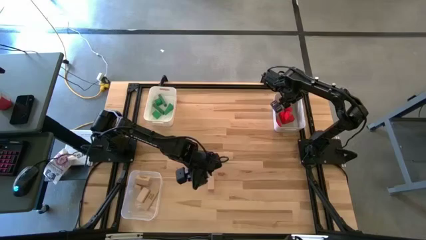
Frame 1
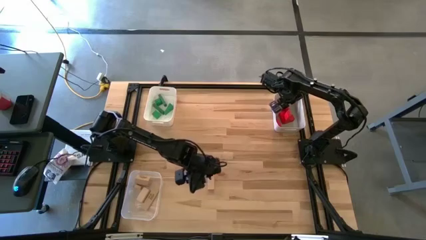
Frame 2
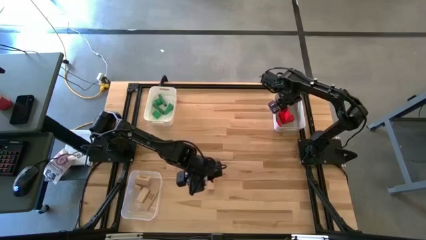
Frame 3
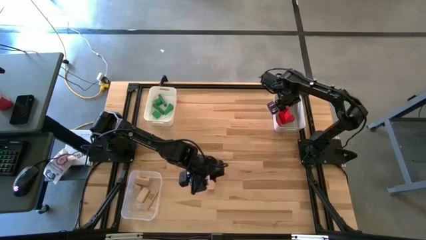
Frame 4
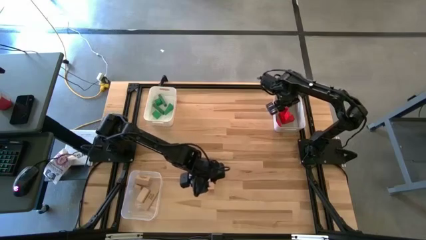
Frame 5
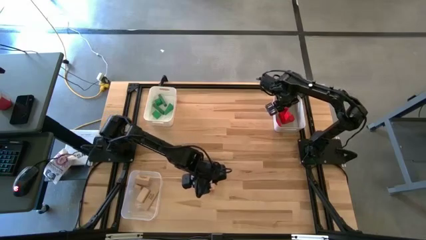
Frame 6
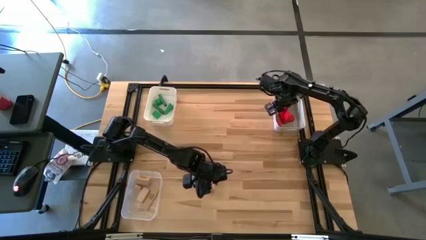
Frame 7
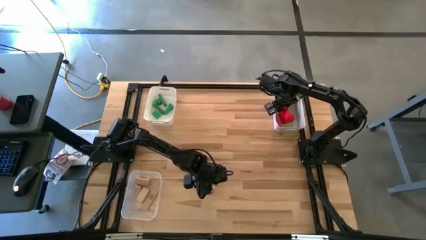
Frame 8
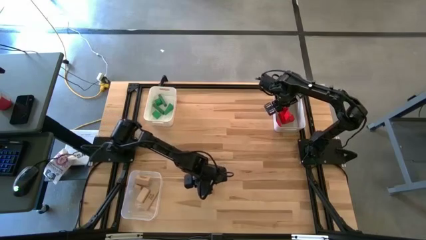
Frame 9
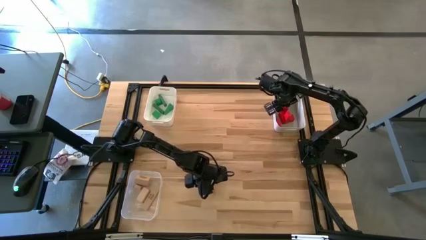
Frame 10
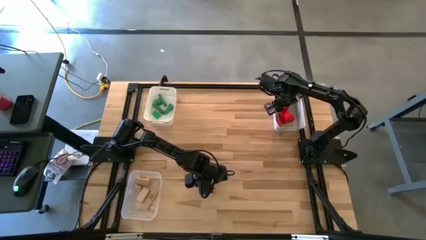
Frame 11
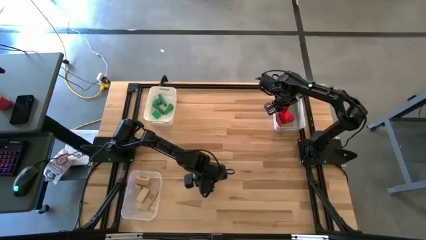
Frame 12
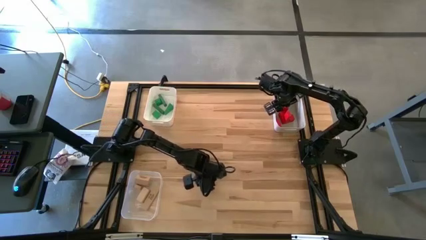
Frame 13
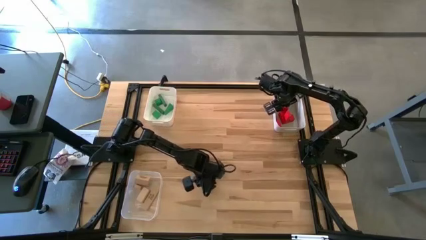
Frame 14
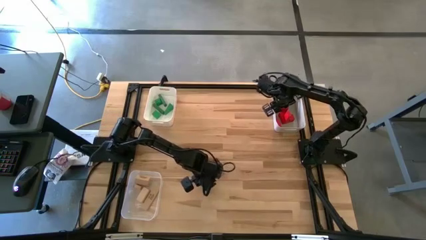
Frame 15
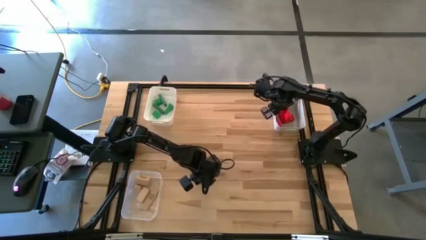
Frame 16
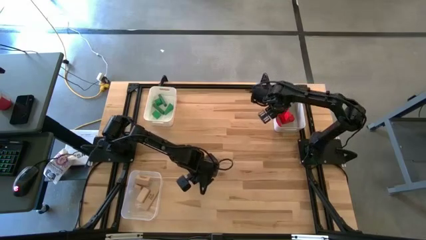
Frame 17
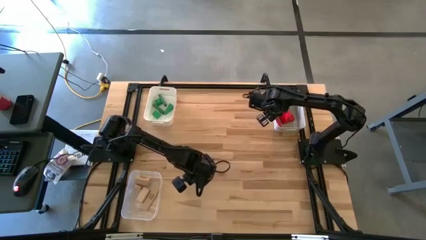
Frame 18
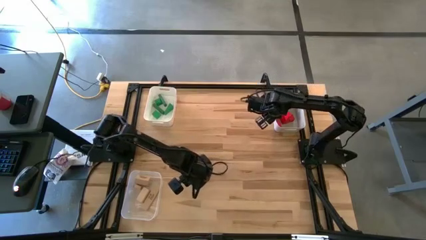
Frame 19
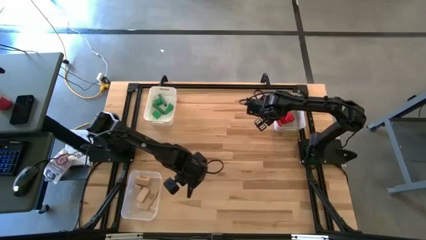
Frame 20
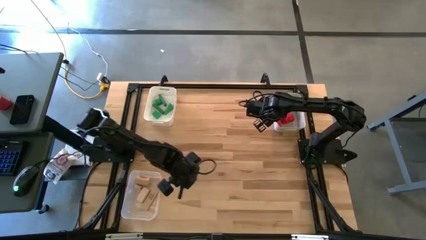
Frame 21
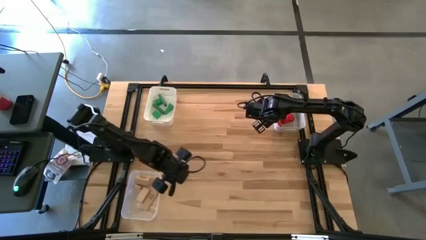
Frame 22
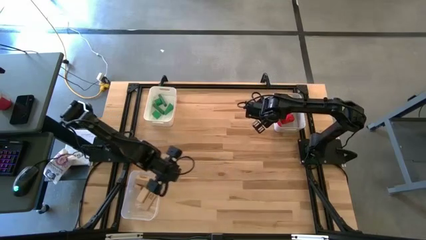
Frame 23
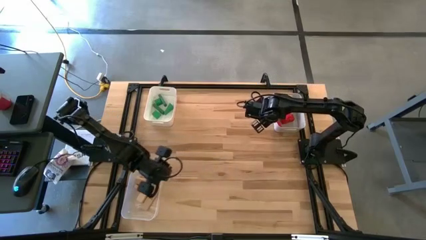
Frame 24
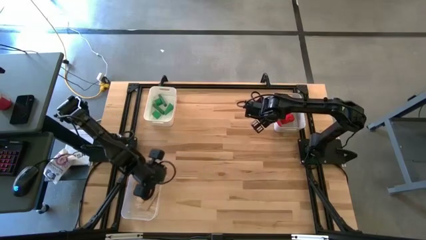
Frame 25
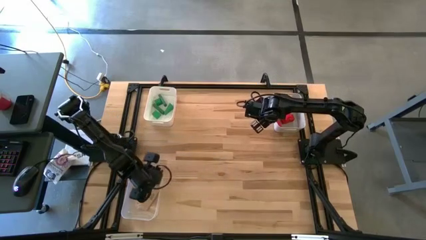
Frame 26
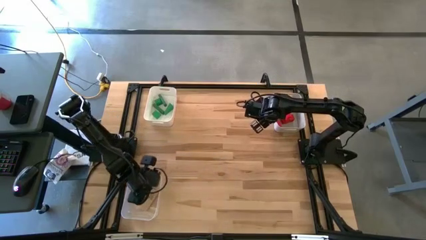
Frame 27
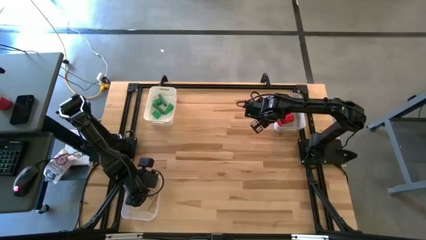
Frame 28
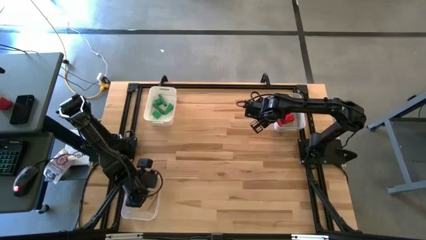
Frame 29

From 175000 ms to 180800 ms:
Task: Sort & place blocks by color
Put the brown block into the transparent bin

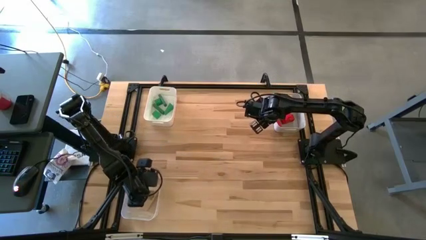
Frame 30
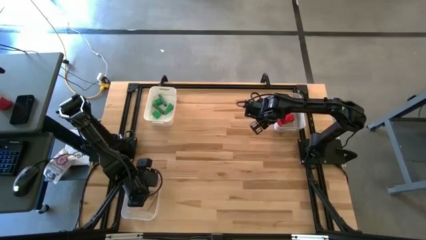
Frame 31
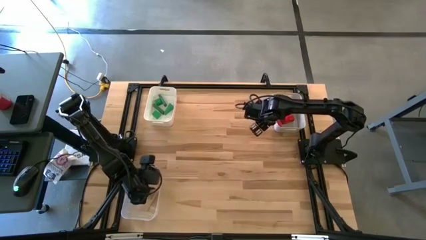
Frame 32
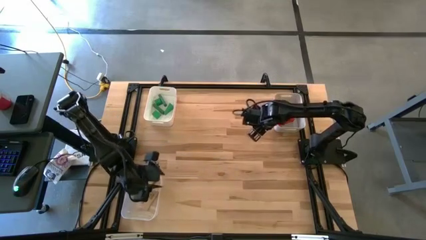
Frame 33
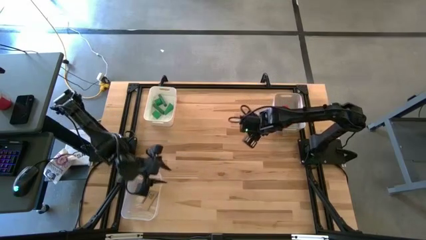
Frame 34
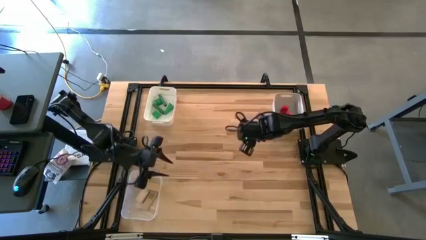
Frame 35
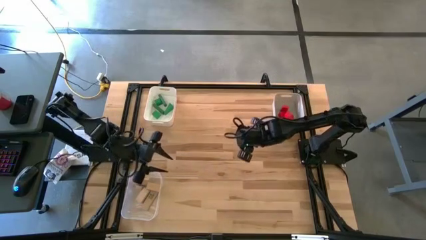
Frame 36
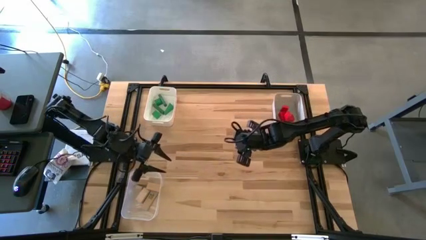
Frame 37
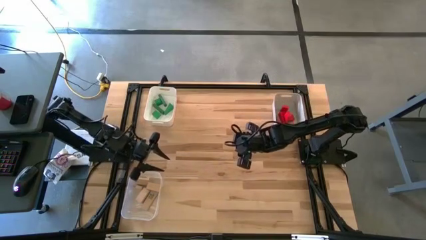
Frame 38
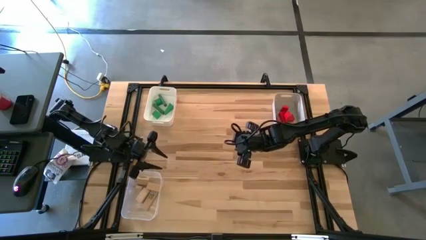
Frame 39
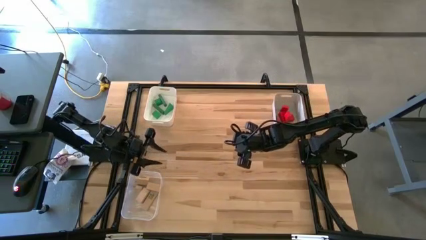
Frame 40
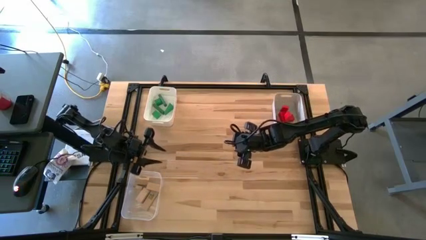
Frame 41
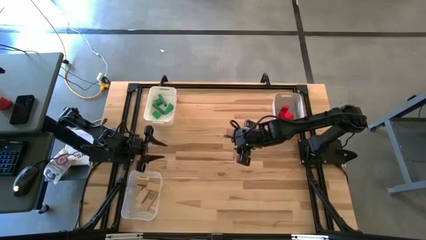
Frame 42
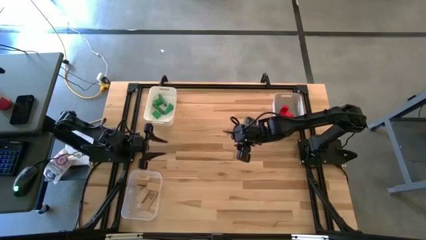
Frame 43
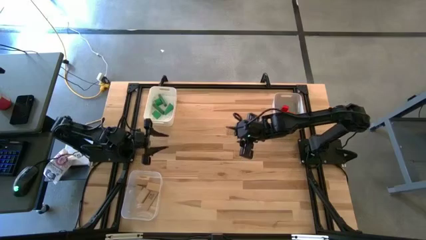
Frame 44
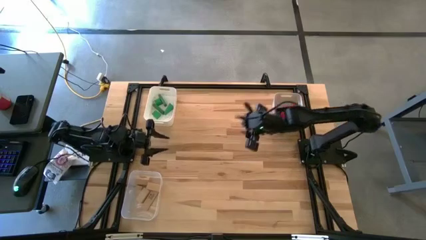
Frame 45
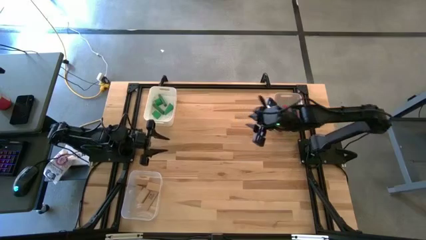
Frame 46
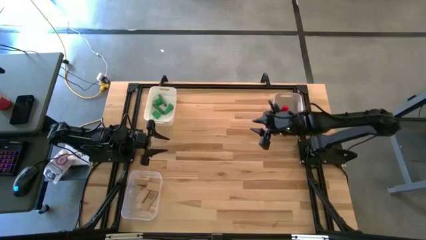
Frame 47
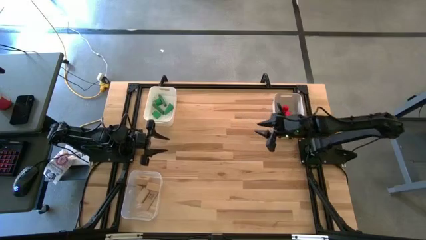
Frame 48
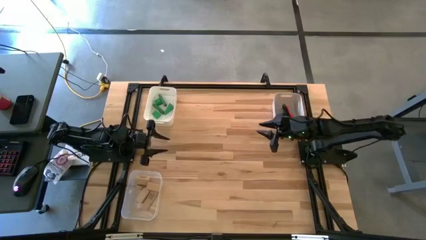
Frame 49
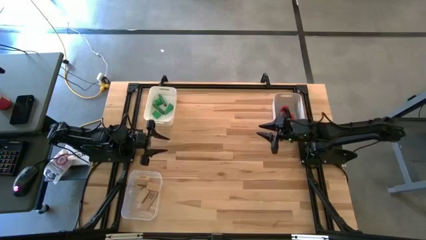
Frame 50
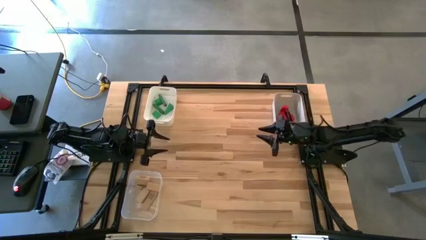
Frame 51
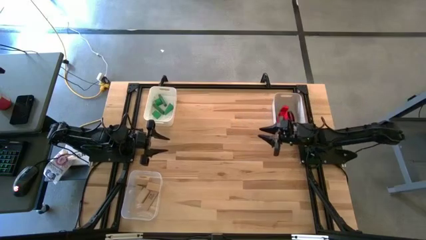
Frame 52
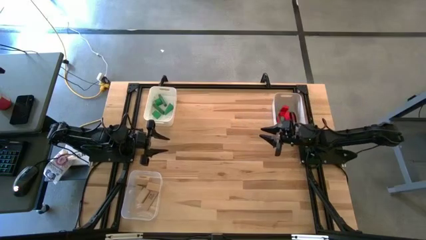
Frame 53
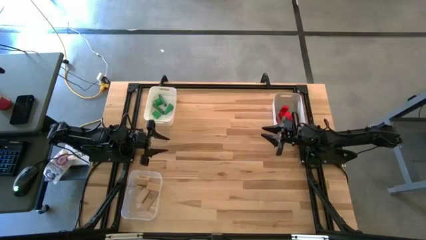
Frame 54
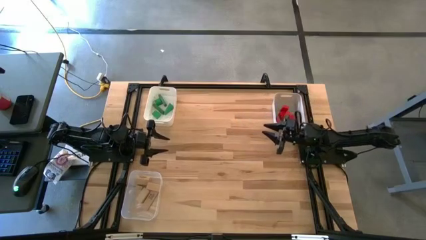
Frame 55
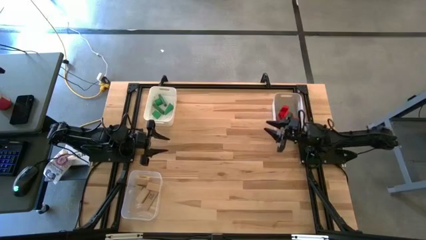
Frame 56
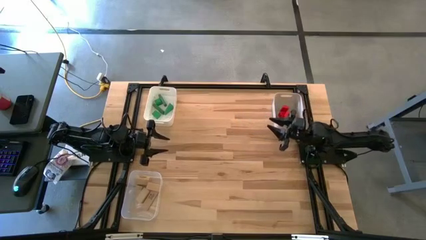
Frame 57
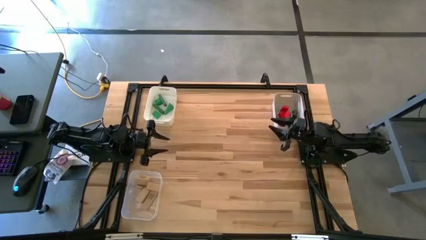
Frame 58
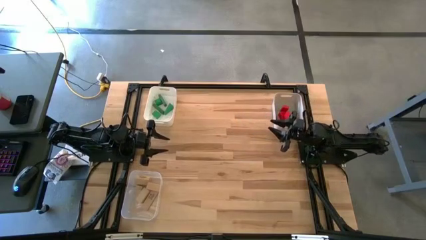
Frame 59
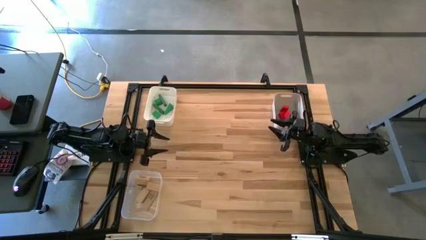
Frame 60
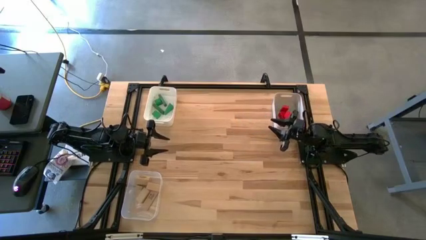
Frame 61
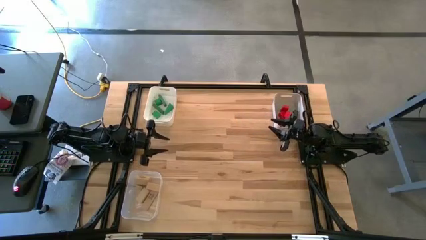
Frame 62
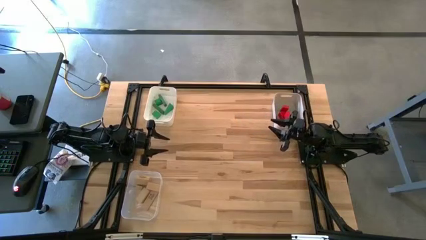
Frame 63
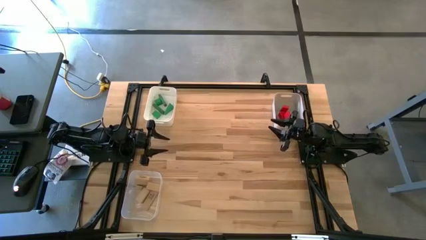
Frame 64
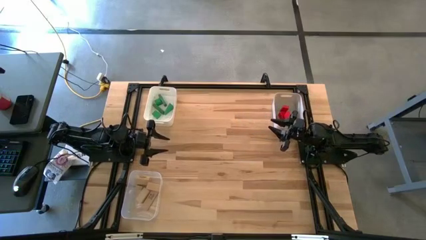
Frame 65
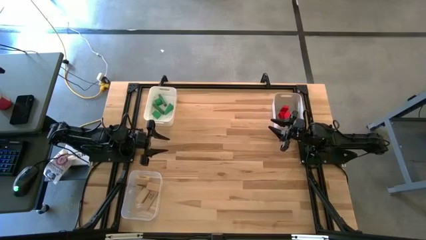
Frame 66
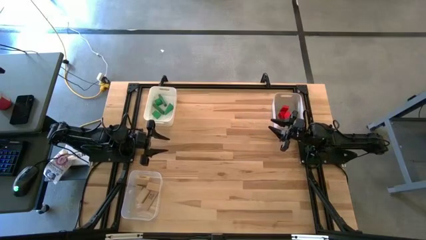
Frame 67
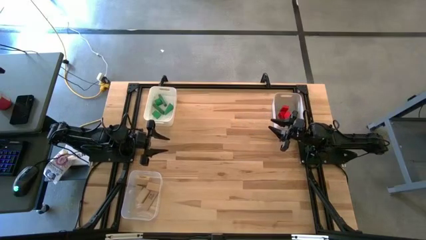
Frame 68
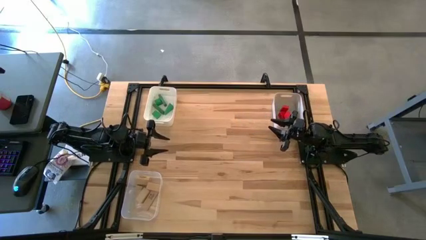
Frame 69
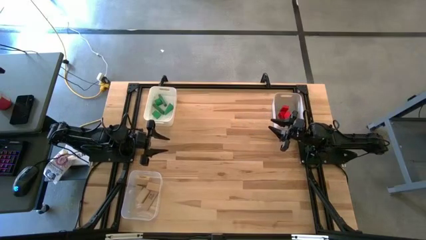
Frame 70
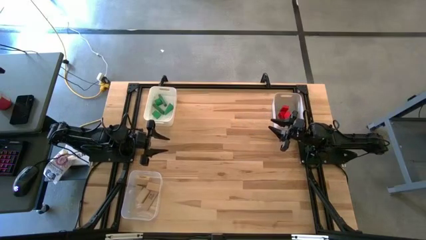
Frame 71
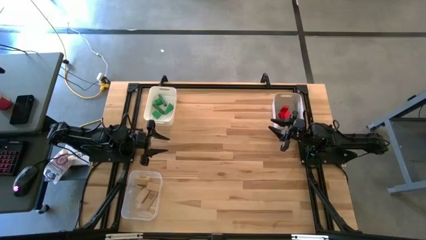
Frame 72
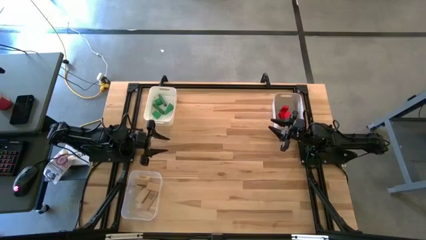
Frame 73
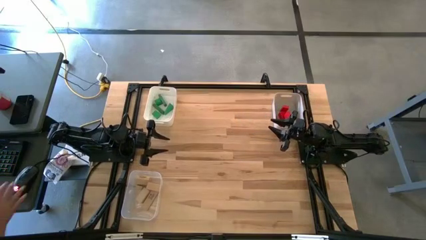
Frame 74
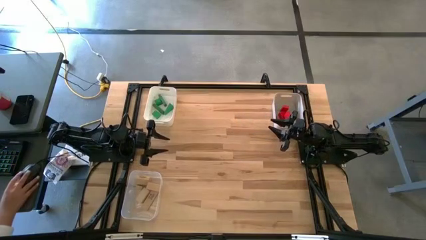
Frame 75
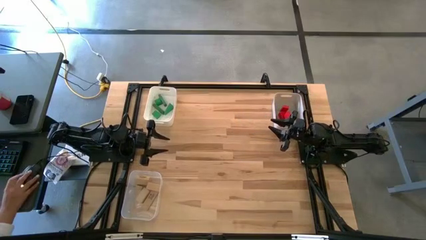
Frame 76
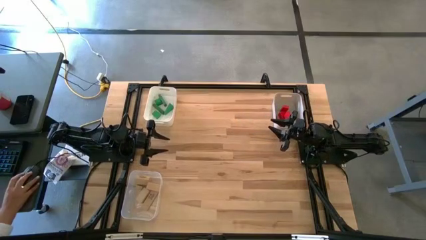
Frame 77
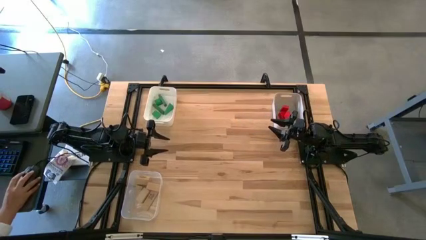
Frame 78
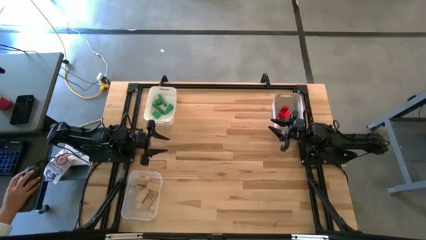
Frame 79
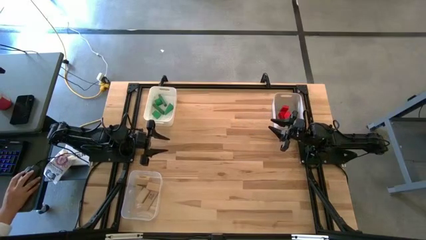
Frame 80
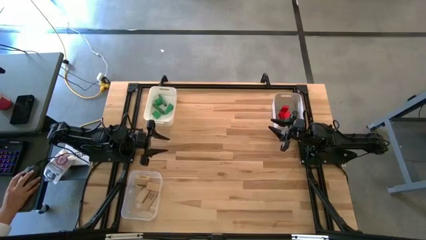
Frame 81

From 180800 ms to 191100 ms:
Return to Home Position
